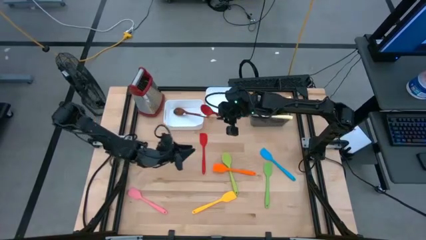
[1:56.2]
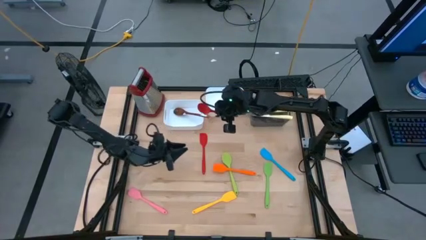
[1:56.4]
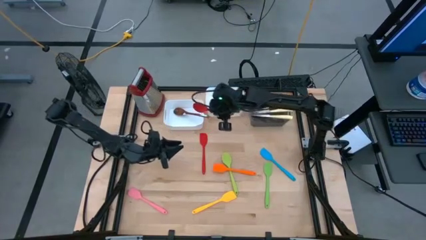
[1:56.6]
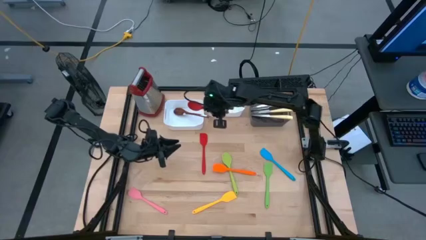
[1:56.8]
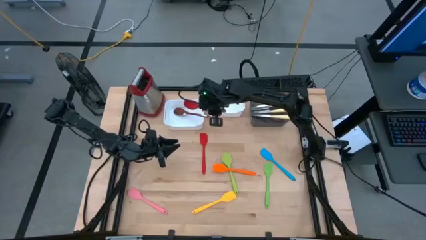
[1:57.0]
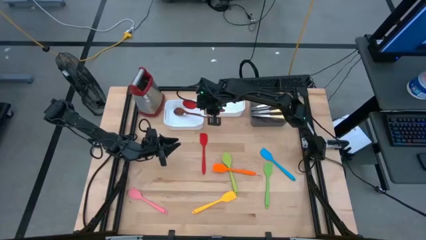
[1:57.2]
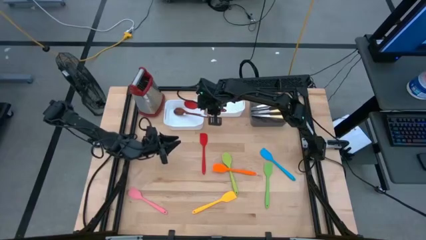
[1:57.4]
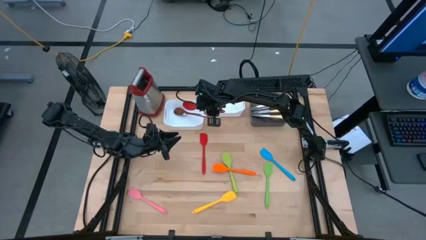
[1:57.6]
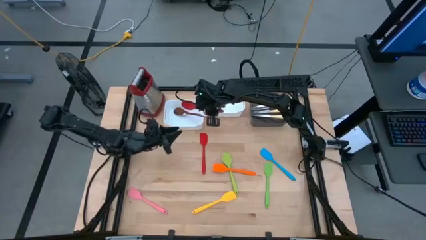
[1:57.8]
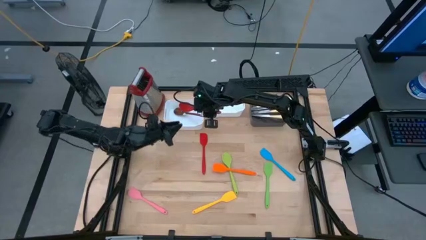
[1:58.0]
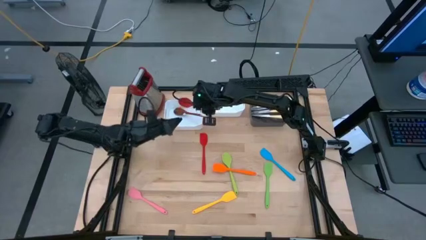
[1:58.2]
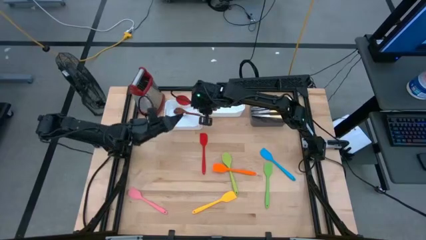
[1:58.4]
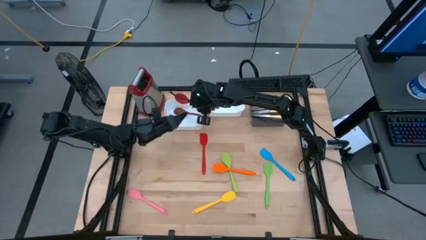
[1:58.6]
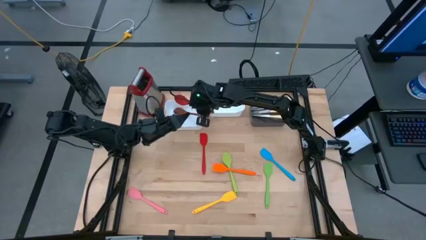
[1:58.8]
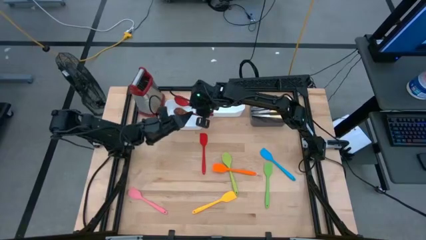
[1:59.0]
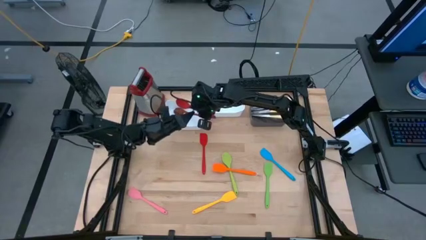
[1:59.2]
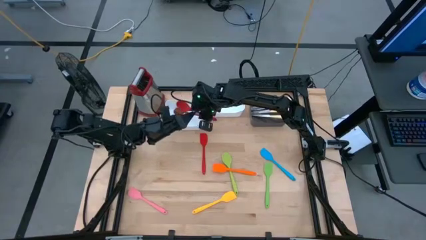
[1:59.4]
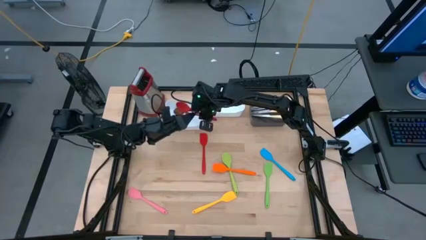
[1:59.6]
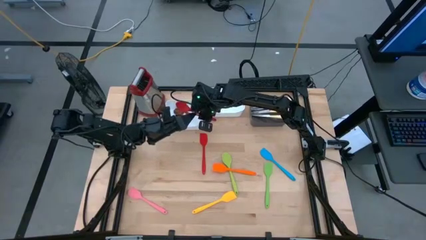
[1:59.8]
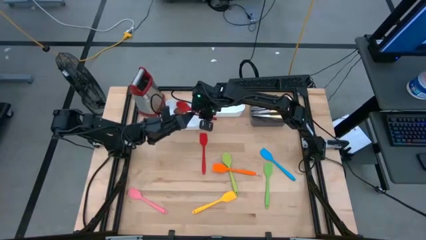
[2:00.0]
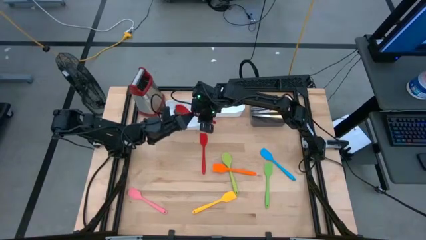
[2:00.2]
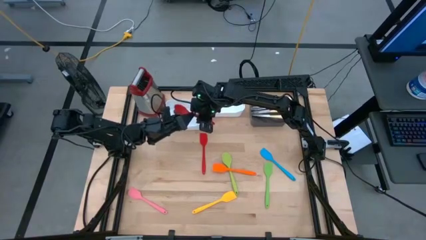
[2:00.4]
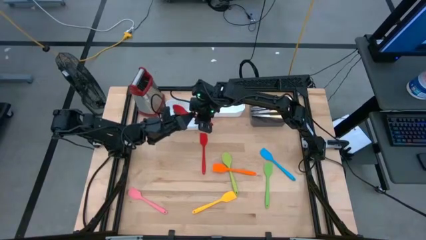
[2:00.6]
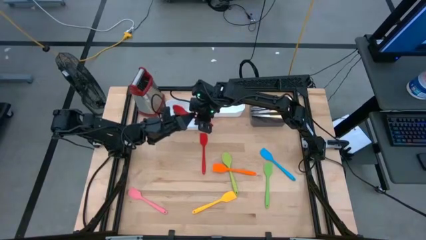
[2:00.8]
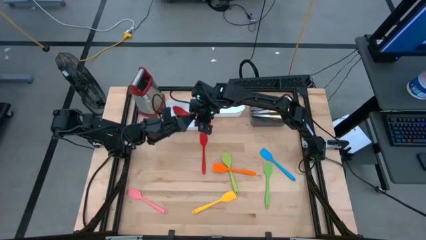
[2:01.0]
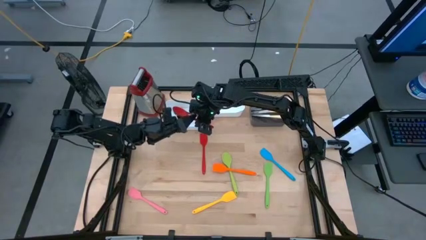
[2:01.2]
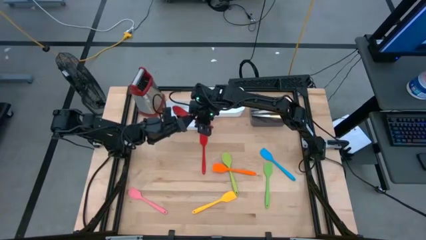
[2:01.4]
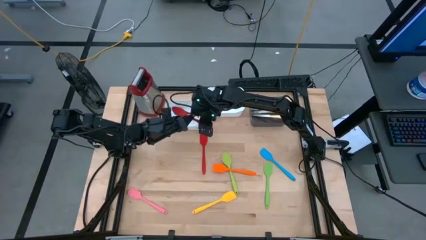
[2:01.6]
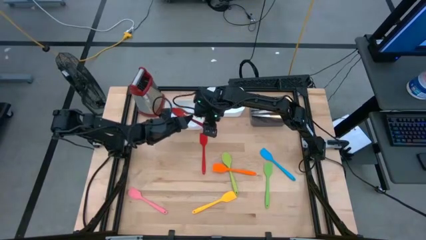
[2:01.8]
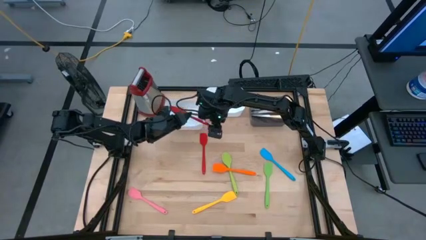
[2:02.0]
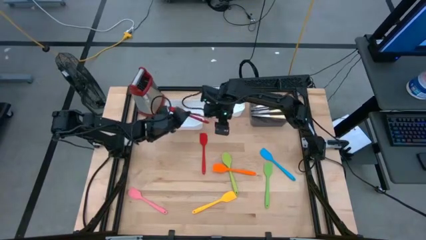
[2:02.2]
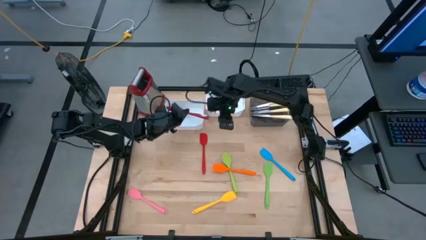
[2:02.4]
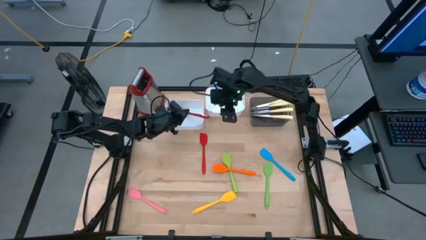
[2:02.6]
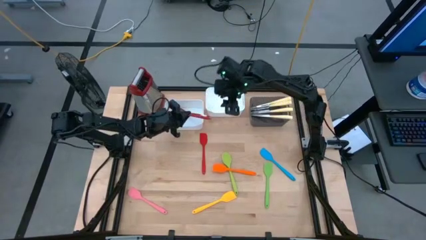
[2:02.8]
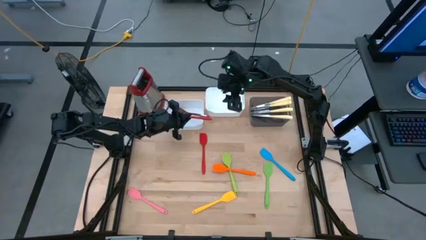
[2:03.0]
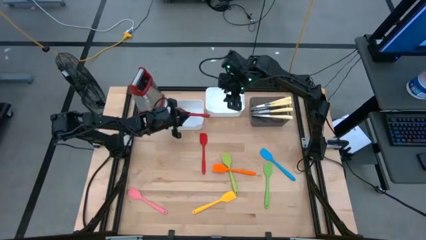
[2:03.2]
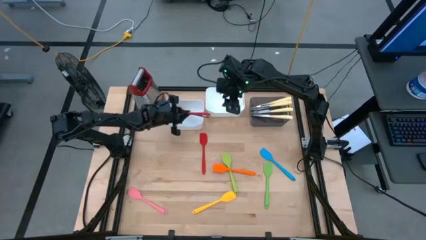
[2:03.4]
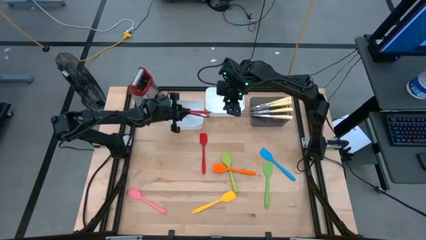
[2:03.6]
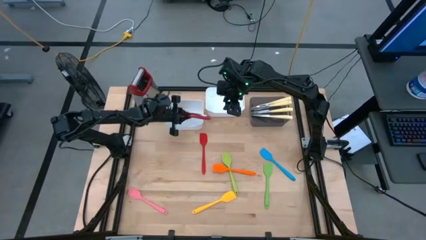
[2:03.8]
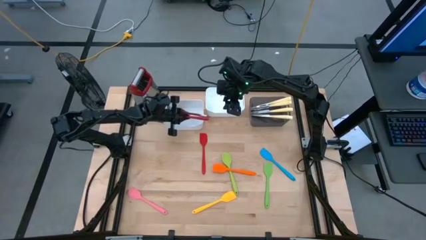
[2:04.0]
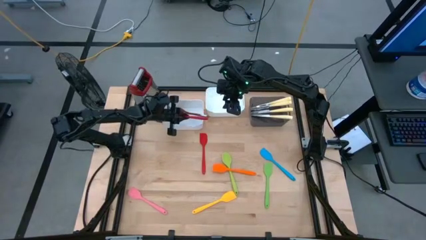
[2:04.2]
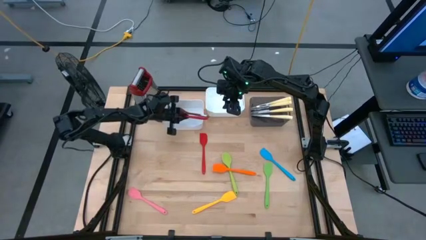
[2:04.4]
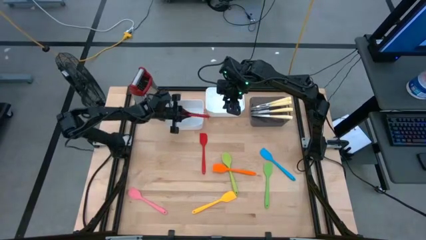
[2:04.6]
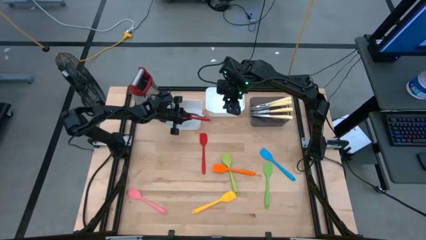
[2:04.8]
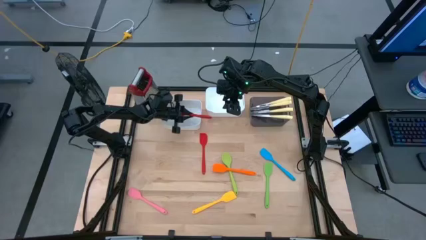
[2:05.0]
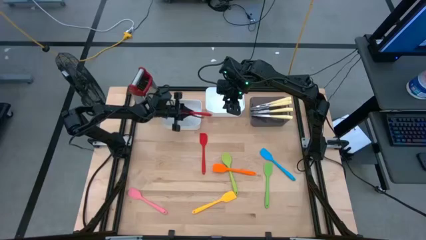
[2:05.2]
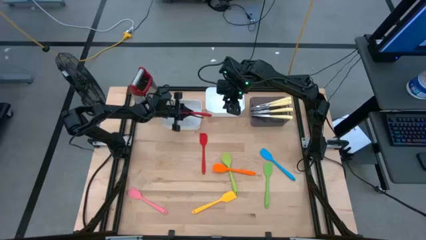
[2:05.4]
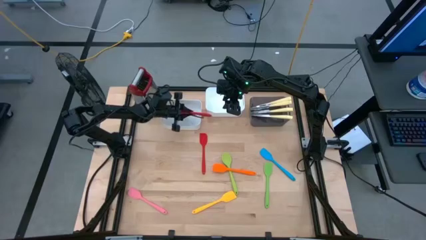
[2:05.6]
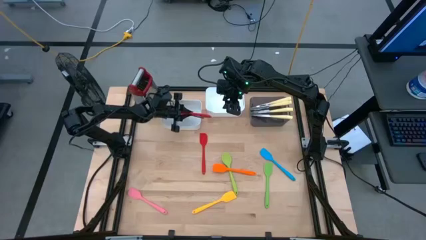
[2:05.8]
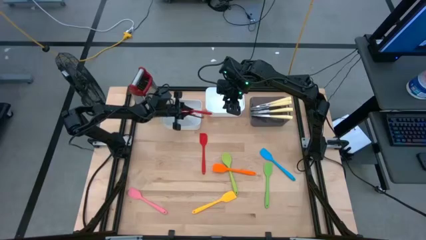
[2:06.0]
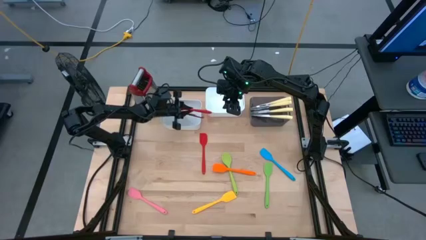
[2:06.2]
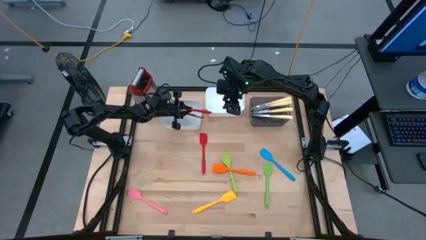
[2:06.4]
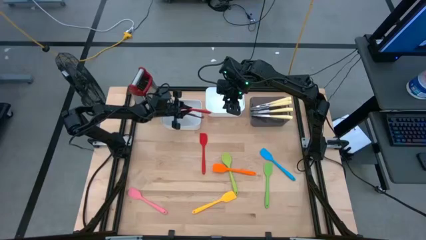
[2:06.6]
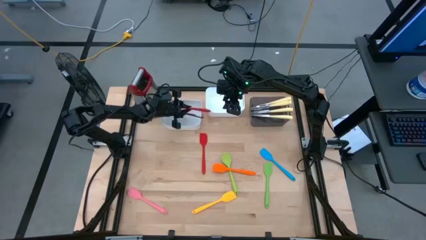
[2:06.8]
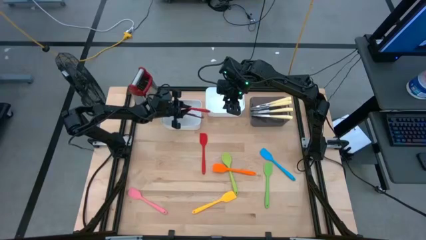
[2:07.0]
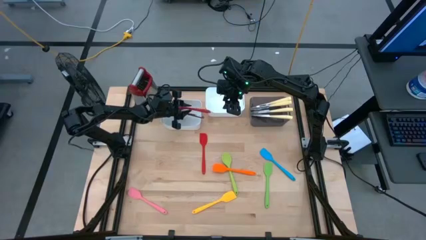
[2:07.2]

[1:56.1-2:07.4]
Task: Pick & Place Kitchen Items
Put the red serving spoon into the left white bin
